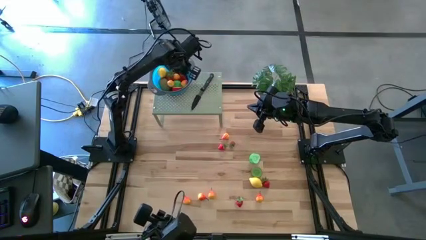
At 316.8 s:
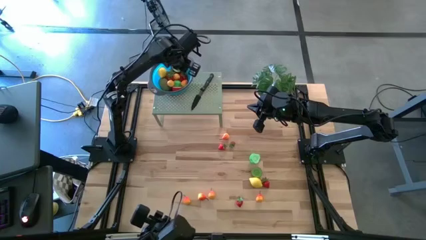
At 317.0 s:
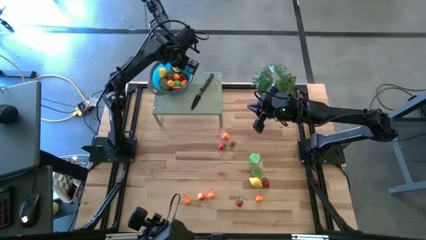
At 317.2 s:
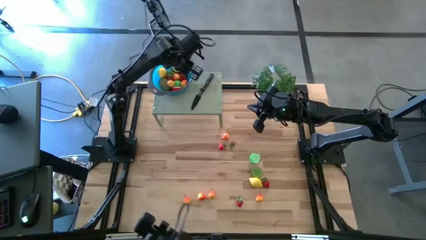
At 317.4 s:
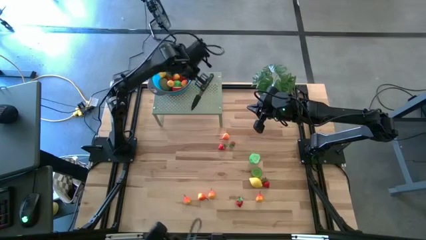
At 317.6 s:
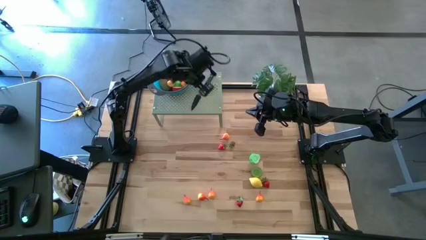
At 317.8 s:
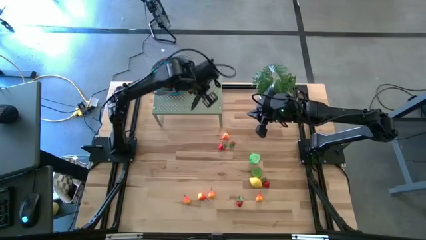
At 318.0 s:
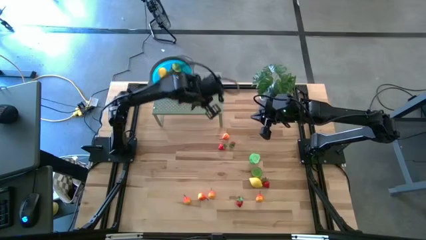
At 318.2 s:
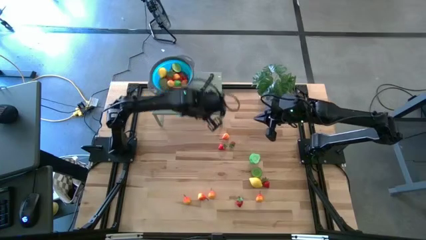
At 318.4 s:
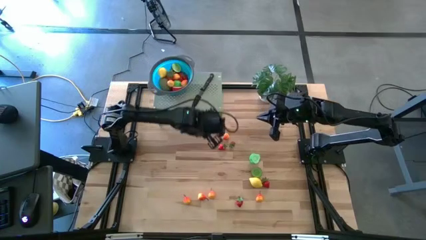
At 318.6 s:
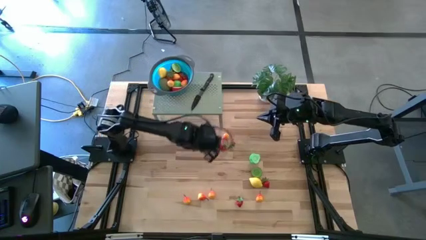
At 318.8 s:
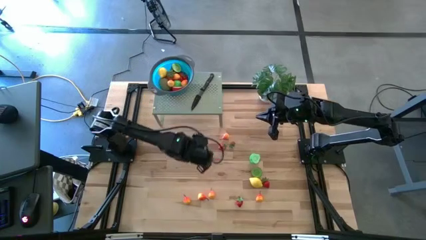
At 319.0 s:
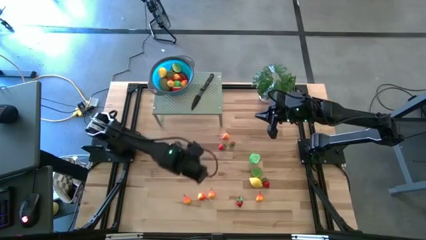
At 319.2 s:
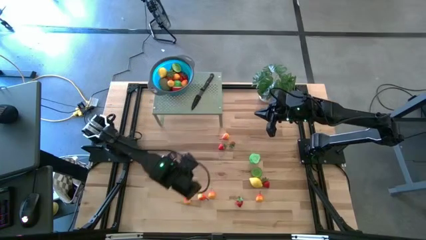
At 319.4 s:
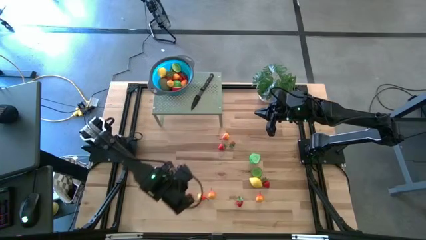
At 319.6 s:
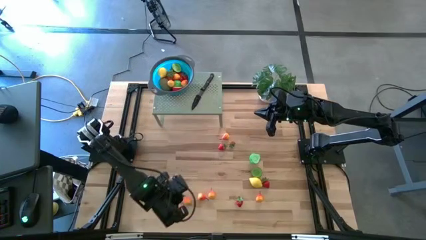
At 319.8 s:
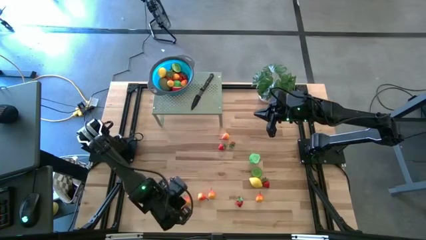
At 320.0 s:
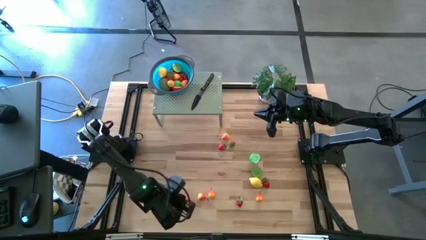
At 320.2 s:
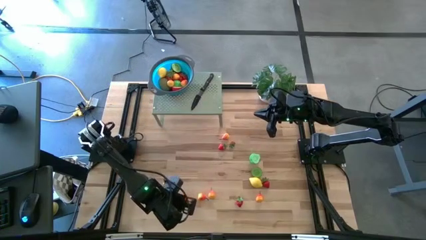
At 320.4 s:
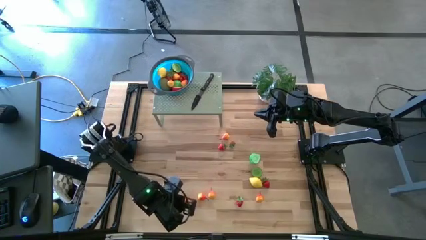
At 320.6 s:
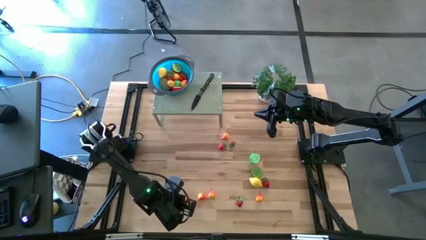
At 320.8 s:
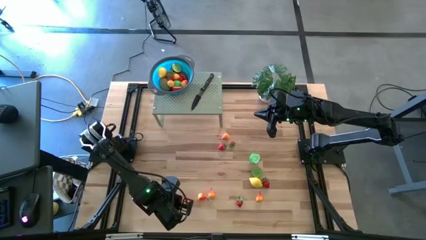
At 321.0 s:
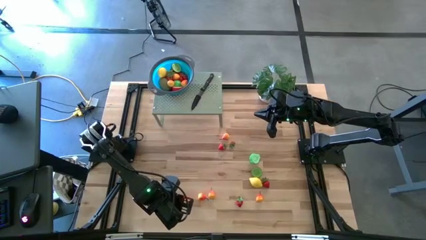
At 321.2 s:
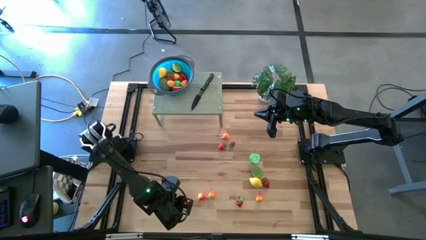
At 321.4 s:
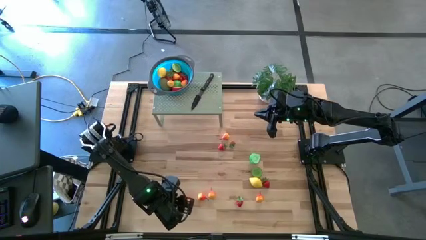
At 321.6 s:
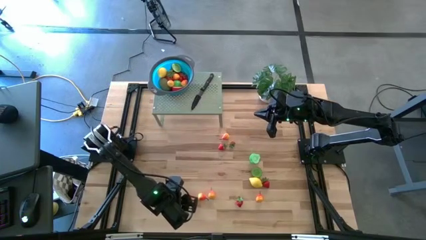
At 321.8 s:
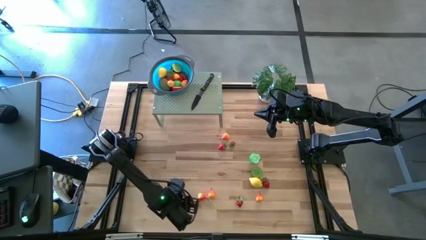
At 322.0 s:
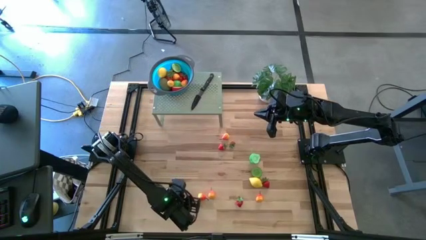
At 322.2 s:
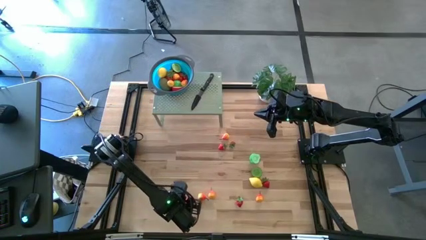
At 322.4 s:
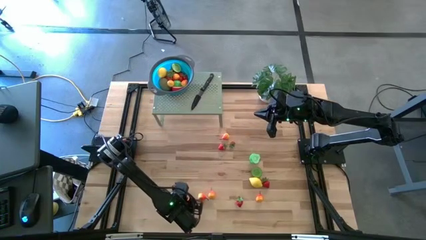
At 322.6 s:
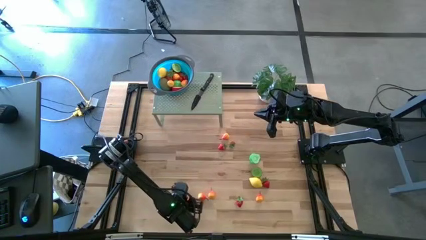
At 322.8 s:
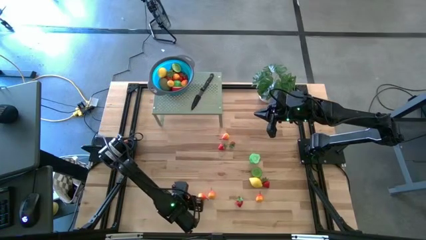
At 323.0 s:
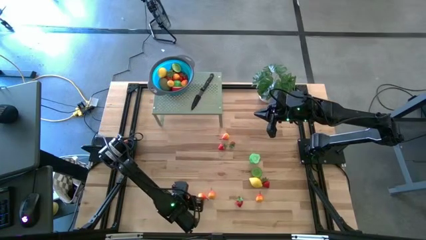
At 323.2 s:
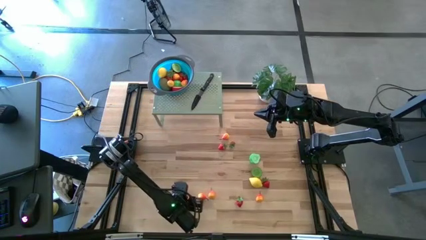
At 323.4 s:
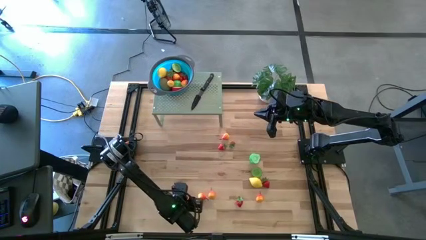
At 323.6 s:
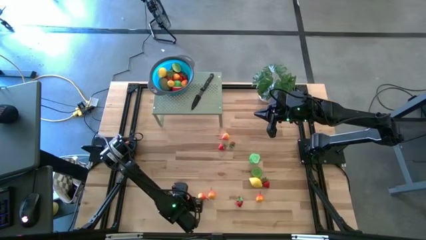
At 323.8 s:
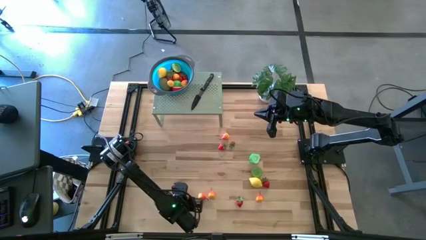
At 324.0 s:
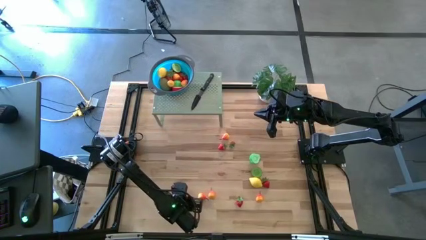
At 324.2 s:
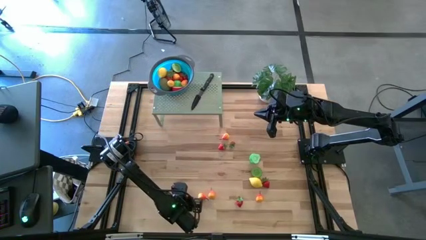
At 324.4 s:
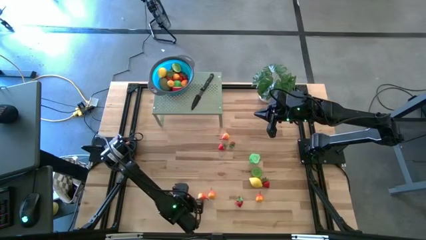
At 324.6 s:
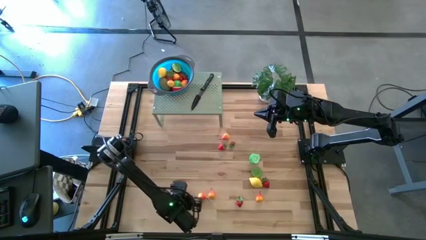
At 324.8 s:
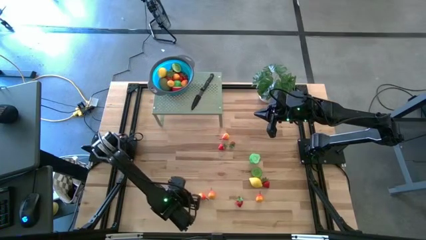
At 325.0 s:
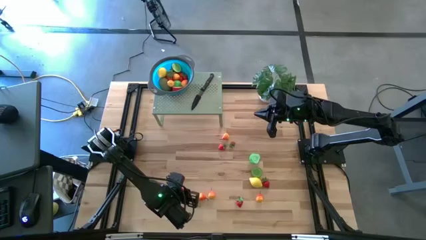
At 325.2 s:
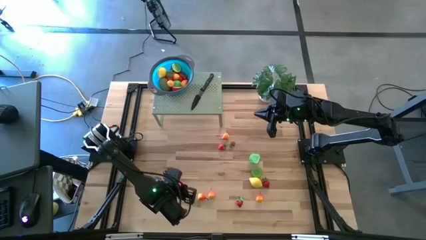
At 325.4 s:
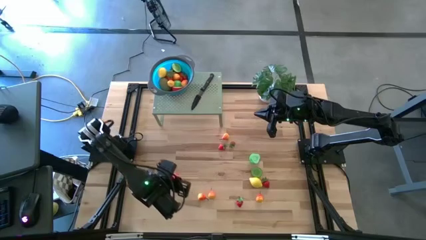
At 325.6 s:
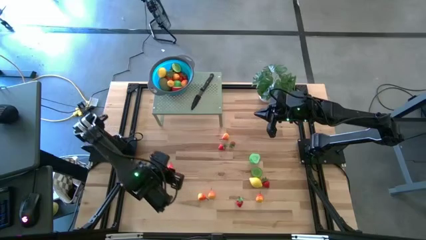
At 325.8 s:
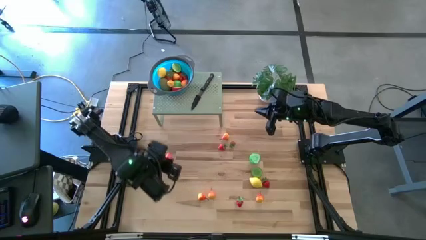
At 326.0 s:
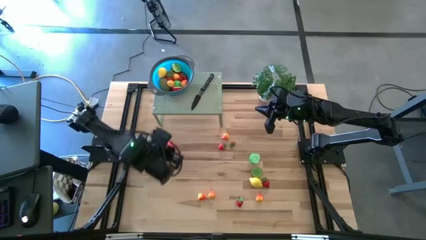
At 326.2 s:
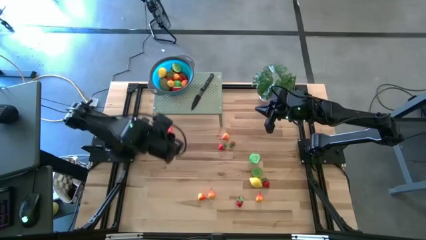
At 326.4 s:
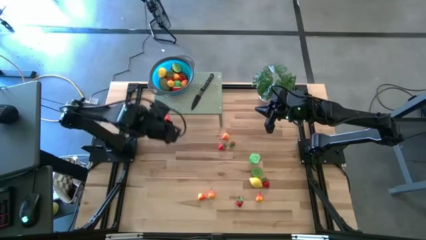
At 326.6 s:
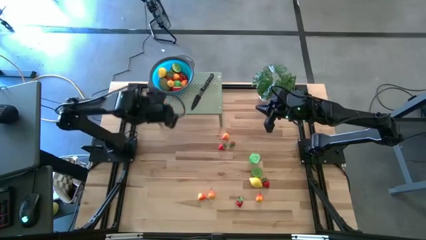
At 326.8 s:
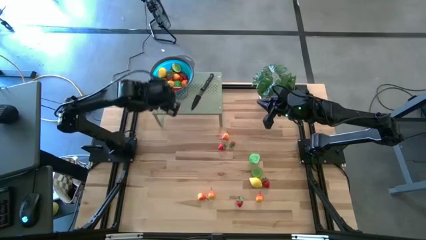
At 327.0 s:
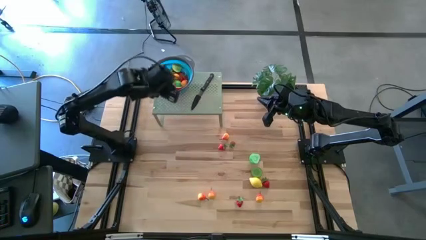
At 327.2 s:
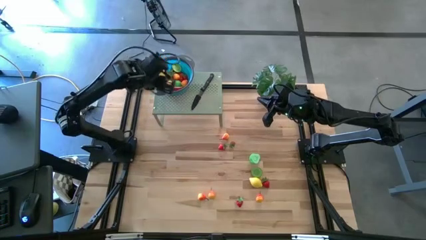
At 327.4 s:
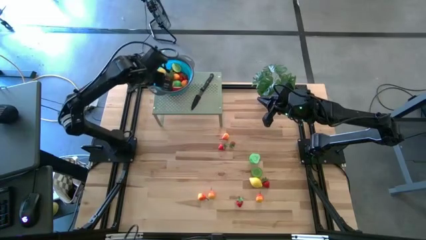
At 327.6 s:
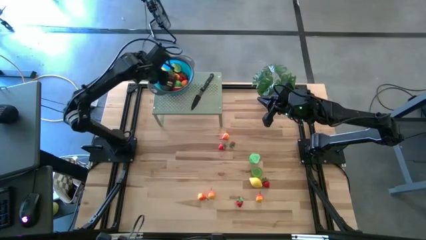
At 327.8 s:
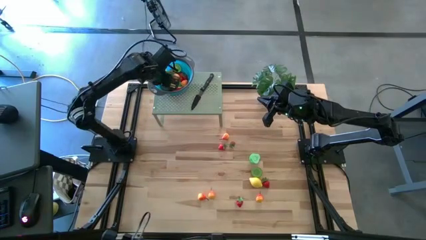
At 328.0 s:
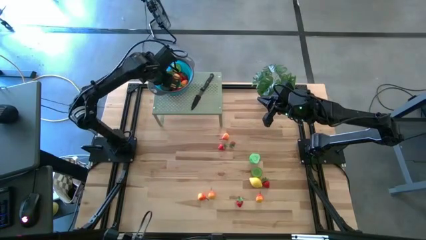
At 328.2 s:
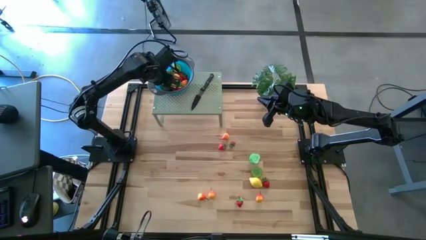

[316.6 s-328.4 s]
Task: Pick & Place Fruit
Put the orange pear into the strainer bowl on the shelf

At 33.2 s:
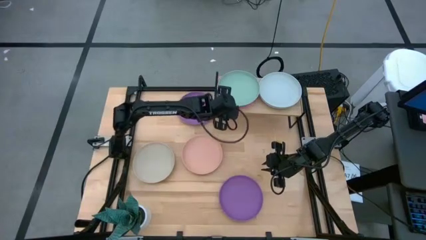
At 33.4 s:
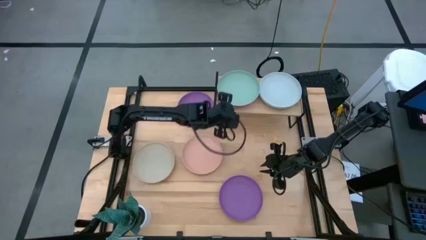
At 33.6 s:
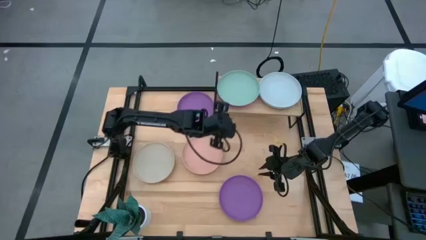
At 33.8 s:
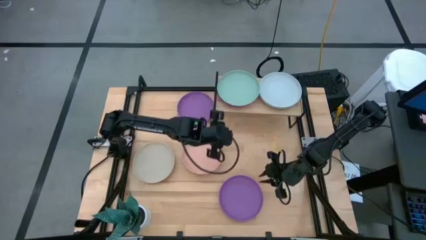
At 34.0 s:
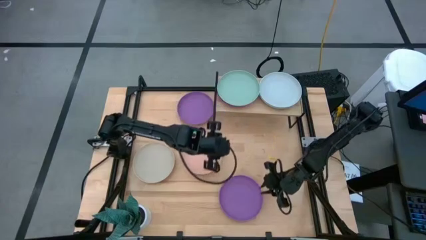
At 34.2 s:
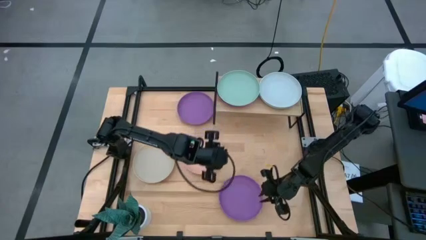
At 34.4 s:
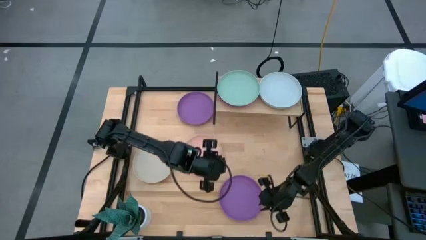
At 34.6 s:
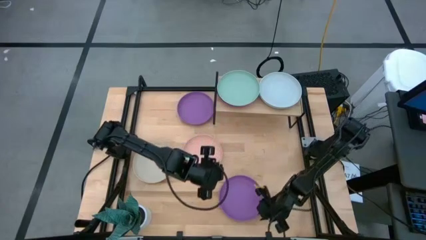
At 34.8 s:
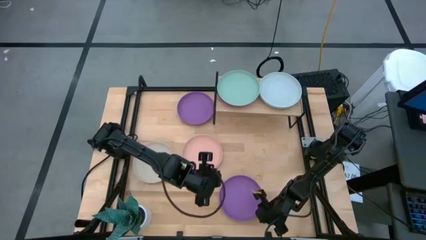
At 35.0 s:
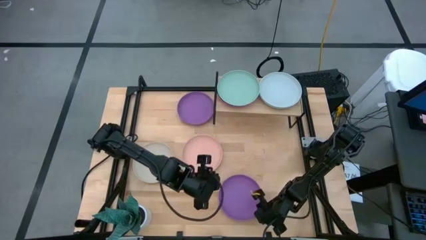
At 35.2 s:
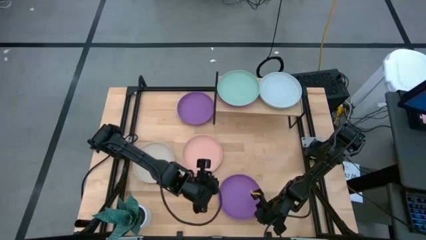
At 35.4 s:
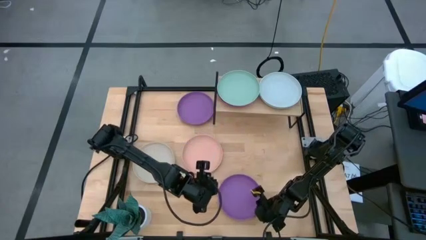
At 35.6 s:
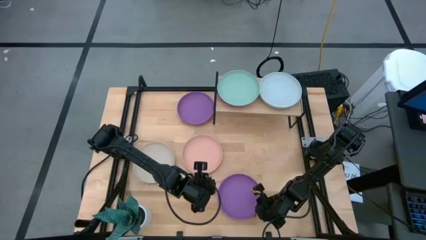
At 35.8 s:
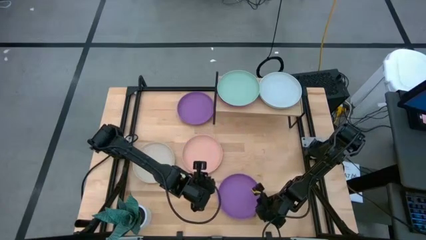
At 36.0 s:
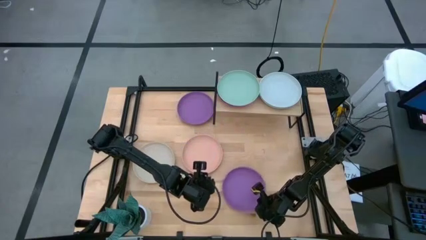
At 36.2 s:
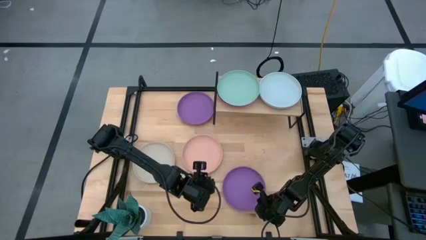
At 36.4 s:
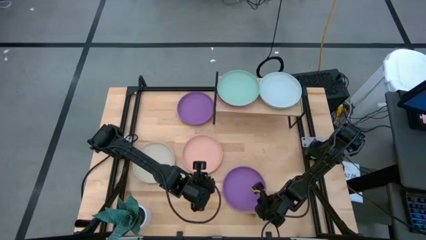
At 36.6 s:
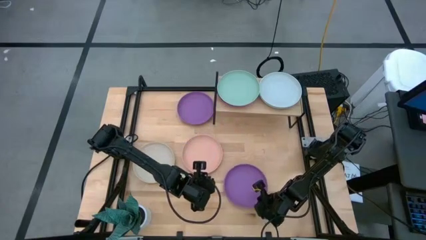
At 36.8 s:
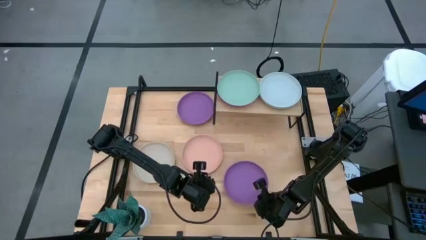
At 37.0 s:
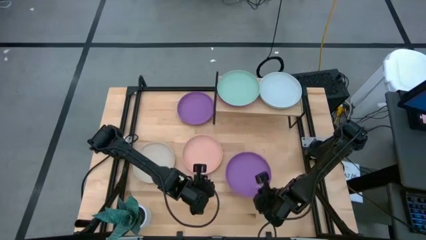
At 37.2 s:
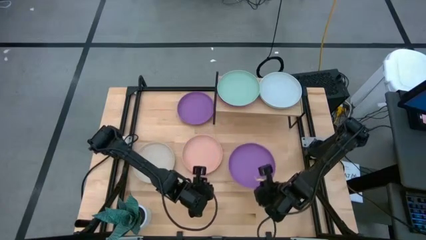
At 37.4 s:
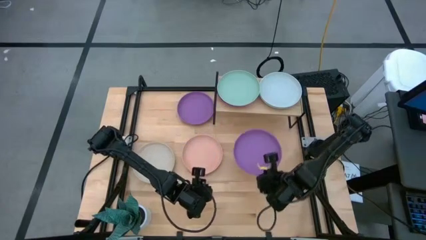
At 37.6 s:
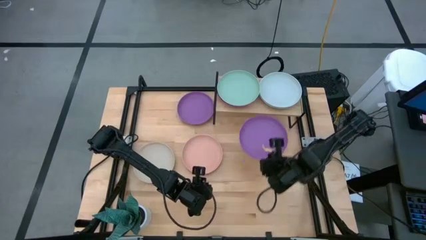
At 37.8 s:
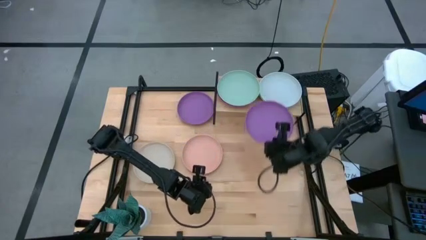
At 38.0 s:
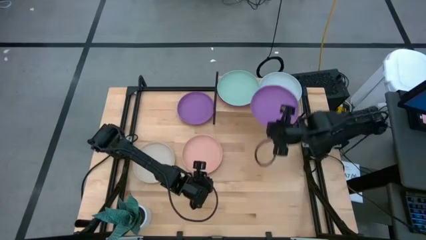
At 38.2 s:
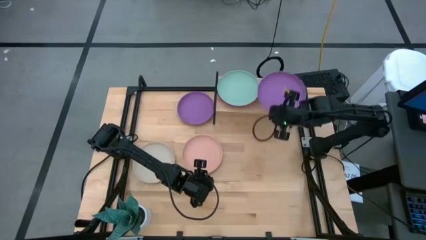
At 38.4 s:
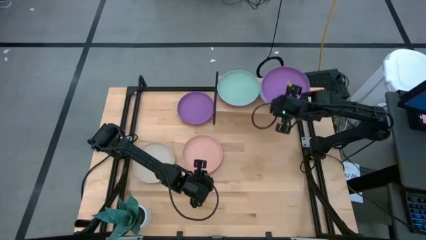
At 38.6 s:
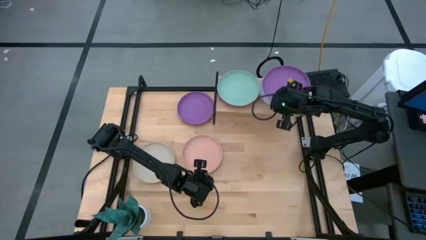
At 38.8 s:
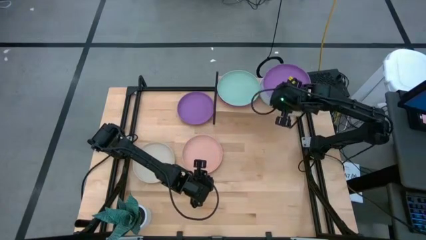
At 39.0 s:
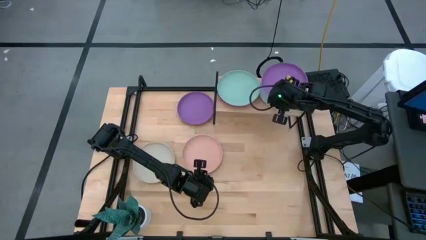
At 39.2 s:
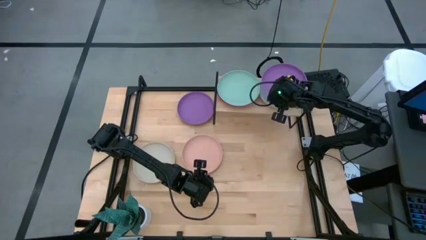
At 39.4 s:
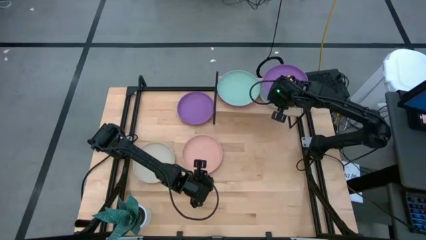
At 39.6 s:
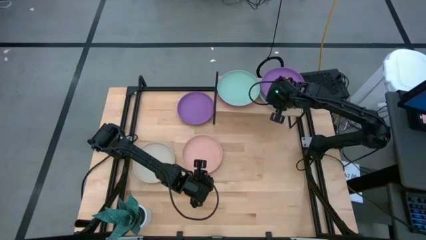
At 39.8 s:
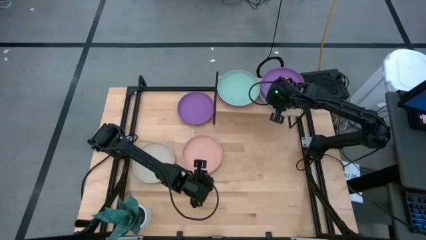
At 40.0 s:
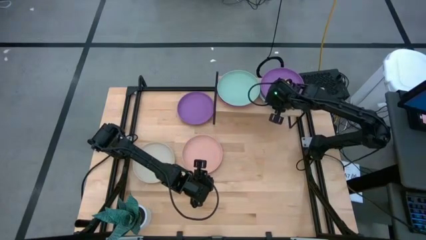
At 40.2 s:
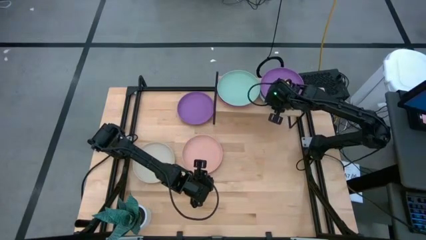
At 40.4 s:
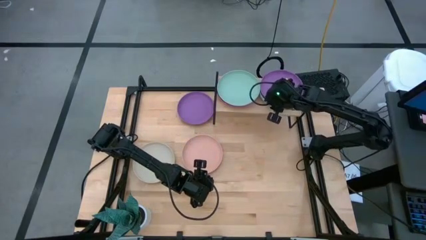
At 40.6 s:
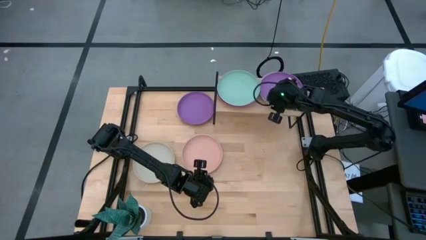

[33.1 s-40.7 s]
Task: Place and stack plates onto a shelf
Stack the bottom violet plate on top of the light blue plate on the shelf
